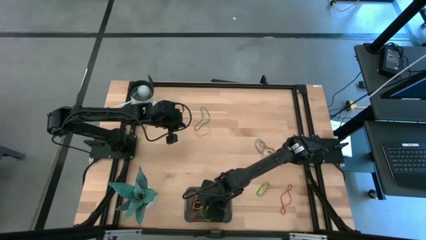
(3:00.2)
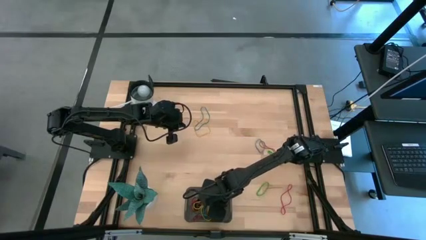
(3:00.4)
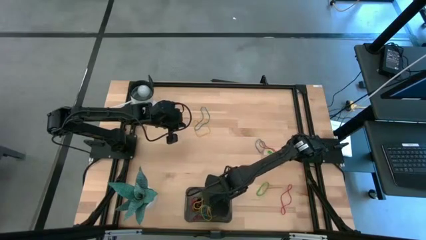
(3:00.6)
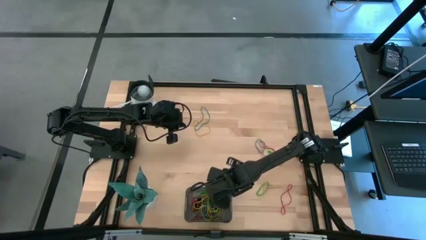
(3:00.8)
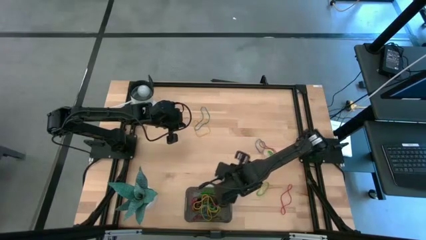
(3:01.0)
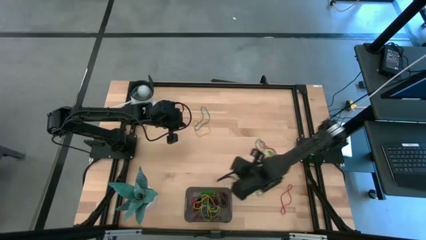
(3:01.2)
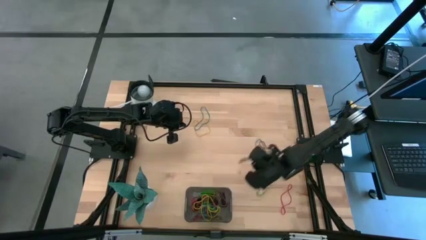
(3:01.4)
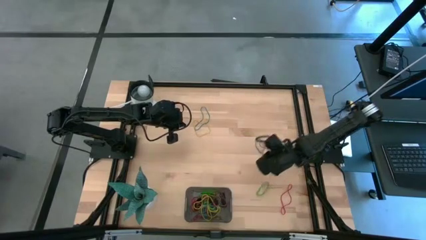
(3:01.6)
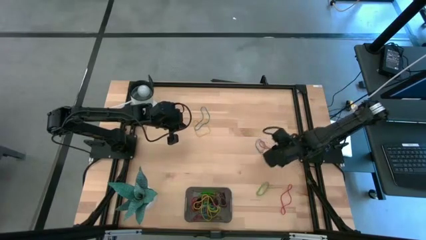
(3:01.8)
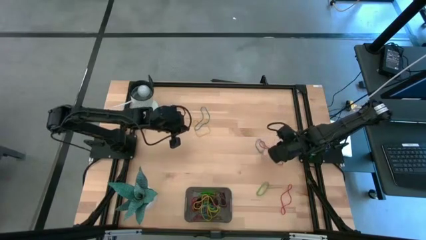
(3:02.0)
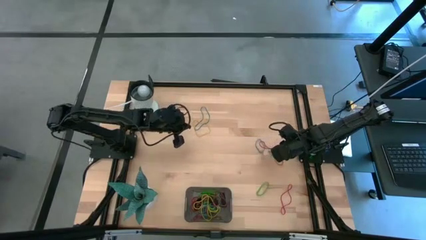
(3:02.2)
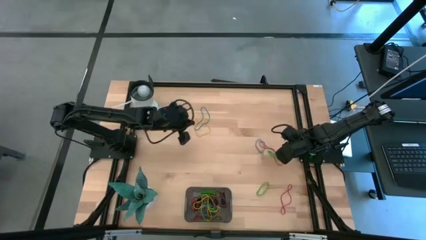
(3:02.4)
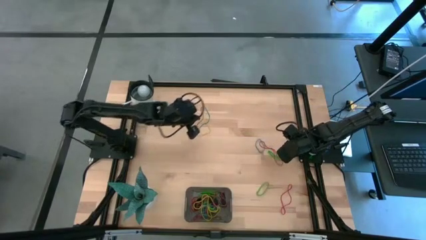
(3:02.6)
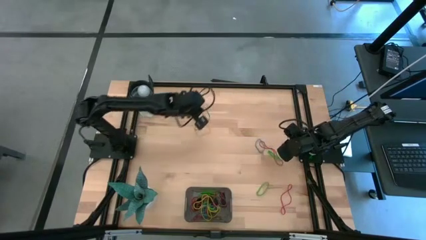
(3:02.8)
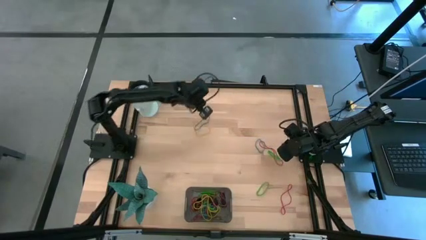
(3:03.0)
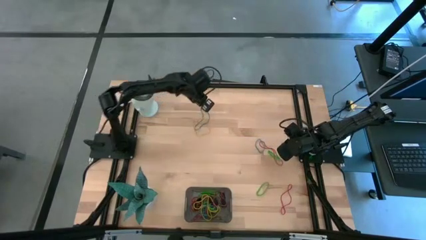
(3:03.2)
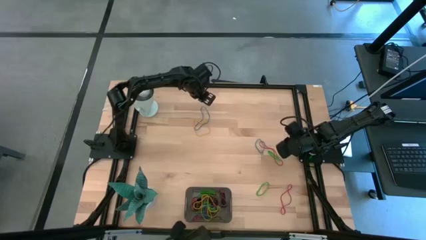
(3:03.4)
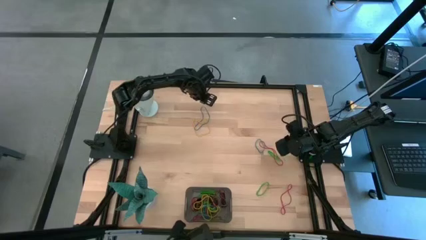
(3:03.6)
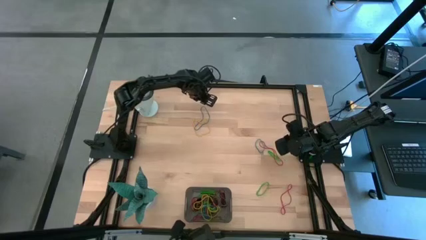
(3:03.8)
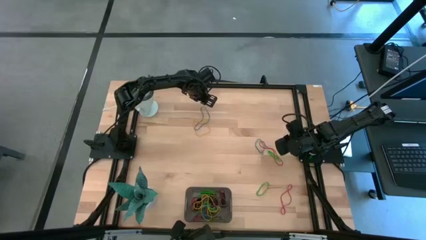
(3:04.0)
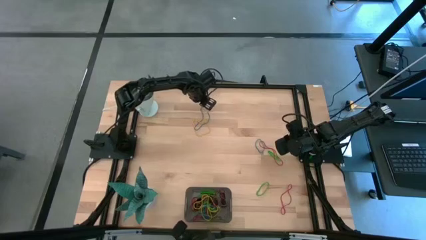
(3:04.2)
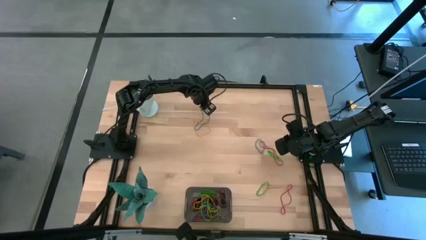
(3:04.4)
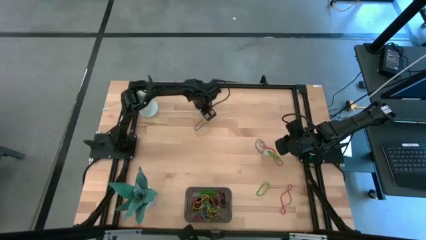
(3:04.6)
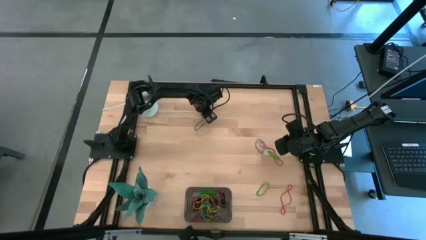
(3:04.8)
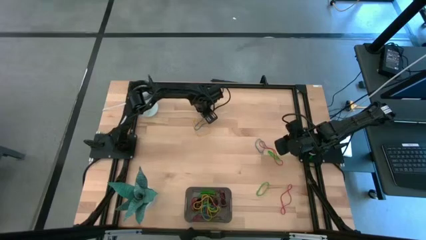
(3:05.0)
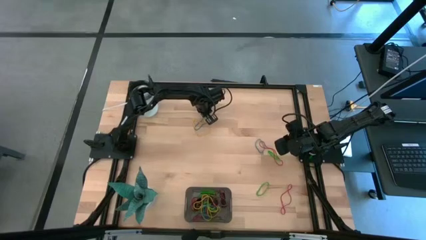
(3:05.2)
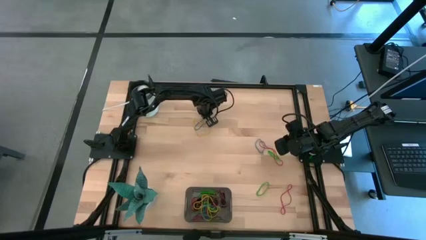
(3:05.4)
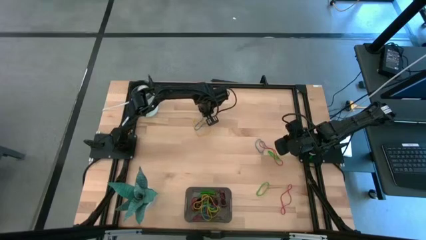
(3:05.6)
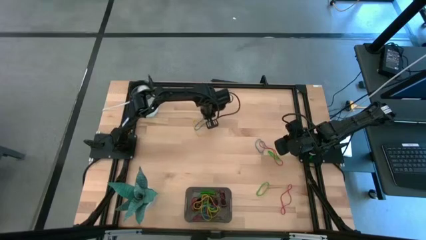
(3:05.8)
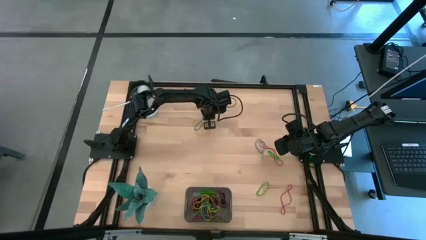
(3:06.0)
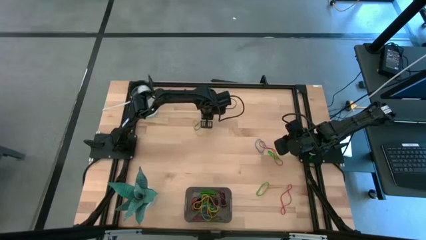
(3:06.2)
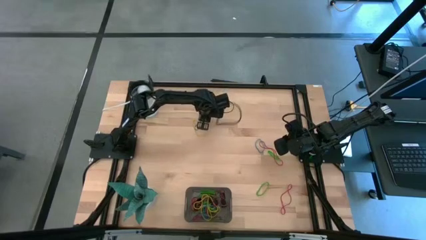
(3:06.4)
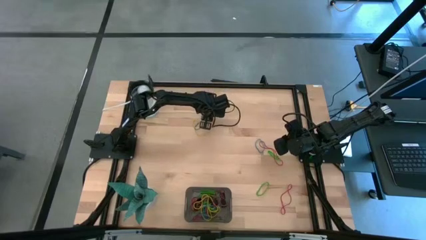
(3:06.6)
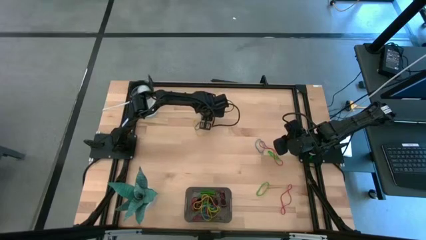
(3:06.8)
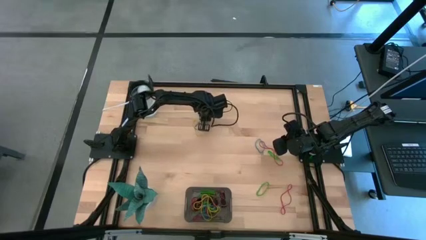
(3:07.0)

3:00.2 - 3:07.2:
Task: Pick and place rubber bands into bin
Put the blue rubber band into the black bin

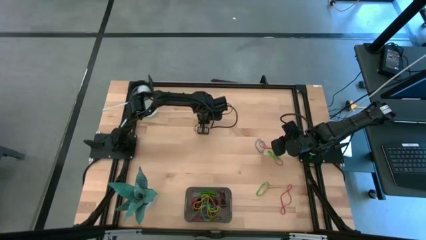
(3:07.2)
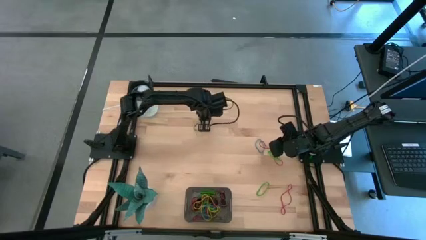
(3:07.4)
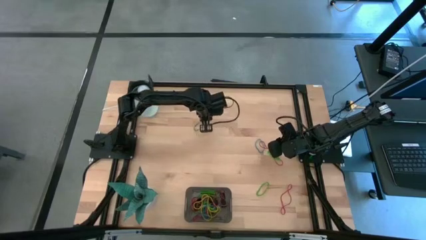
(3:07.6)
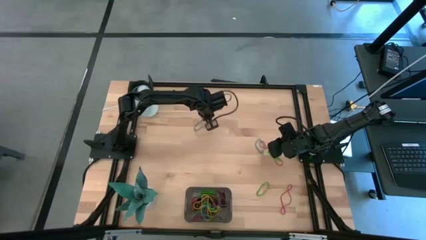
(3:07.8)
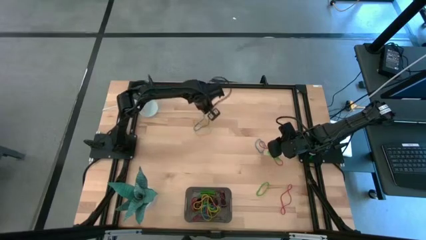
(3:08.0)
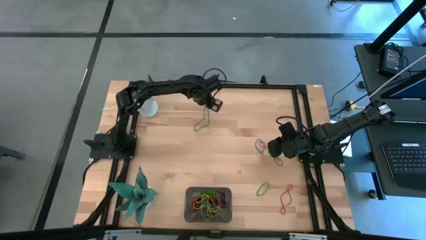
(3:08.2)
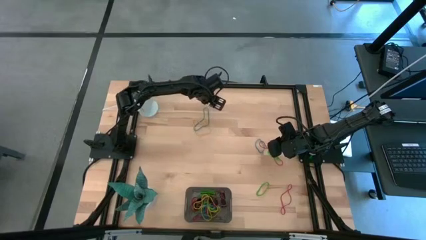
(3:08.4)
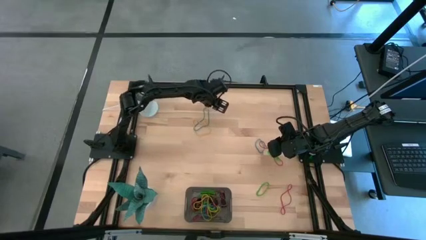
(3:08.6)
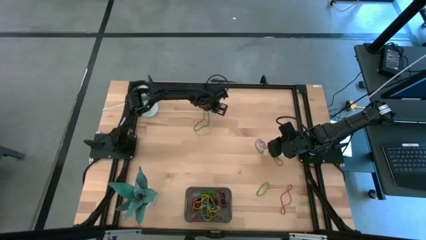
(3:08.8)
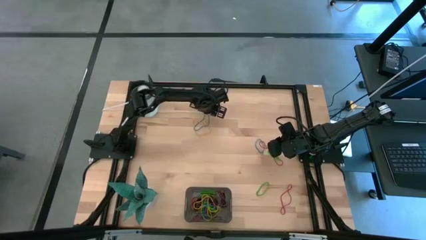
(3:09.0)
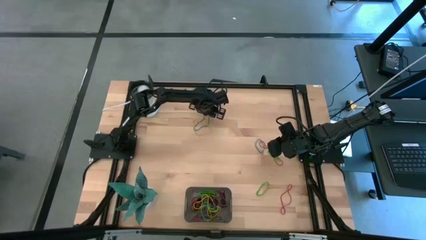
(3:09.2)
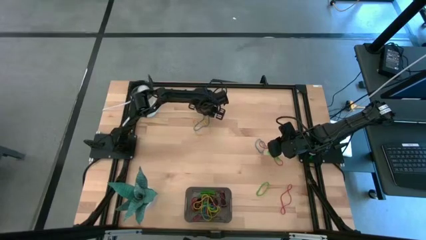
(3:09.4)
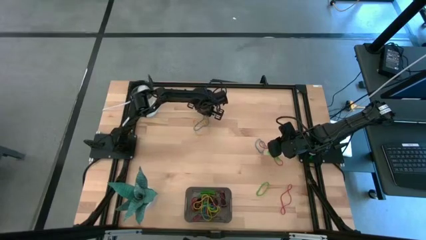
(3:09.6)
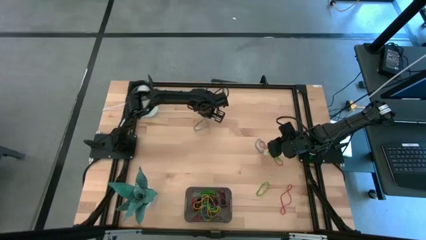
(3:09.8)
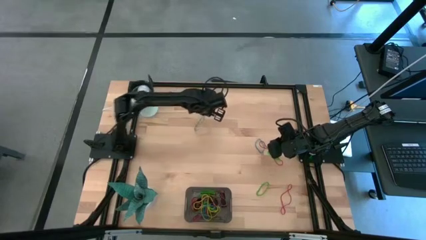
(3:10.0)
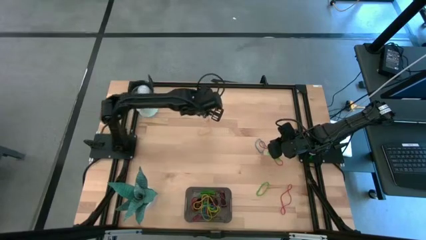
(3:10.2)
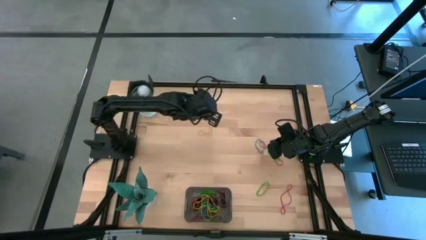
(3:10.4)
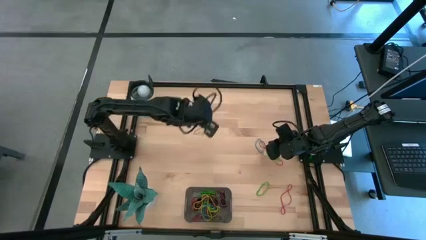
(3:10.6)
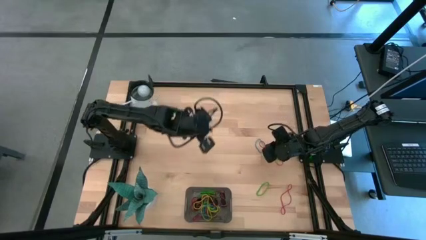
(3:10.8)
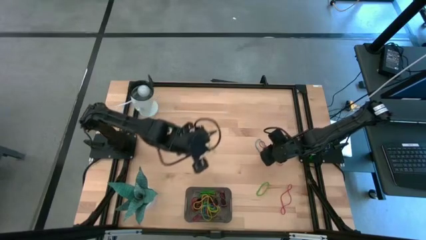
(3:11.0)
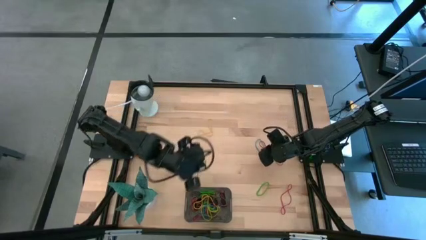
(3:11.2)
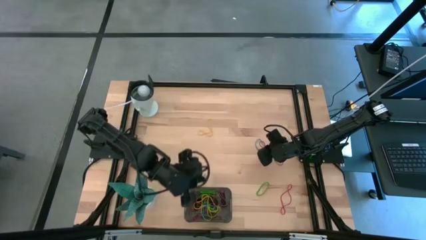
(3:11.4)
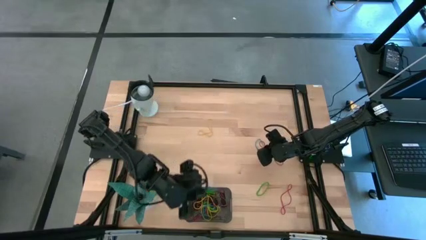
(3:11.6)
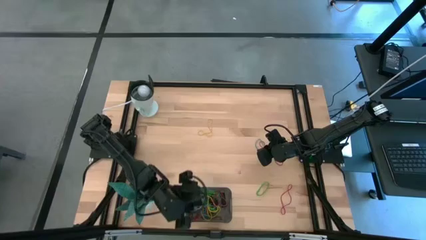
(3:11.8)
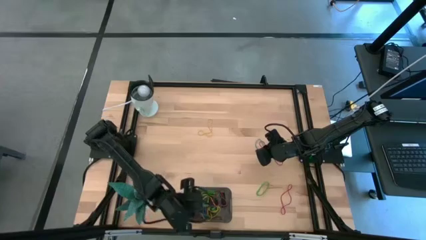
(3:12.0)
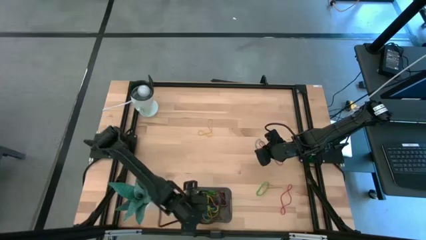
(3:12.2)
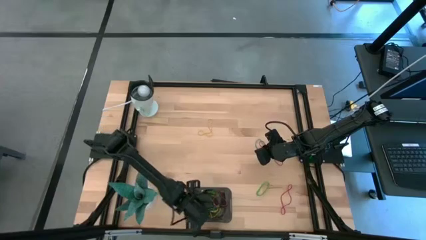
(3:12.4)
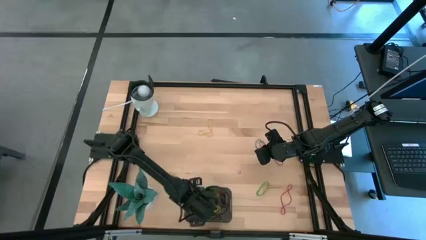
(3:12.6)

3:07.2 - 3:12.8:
Put the blue rubber band into the black bin

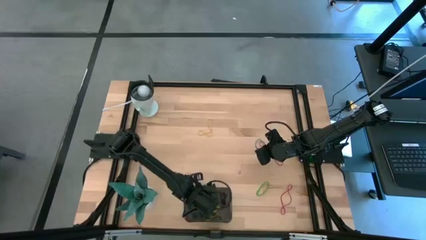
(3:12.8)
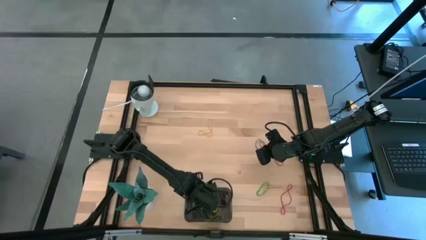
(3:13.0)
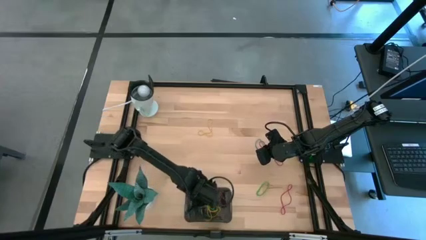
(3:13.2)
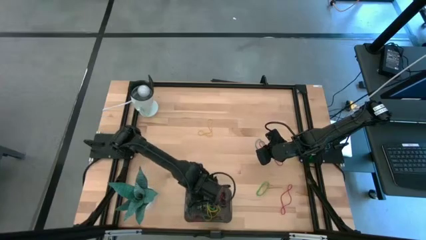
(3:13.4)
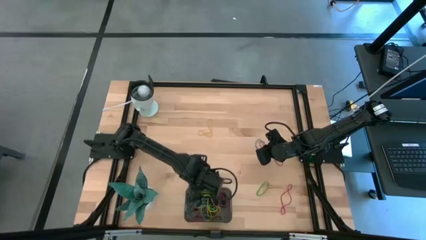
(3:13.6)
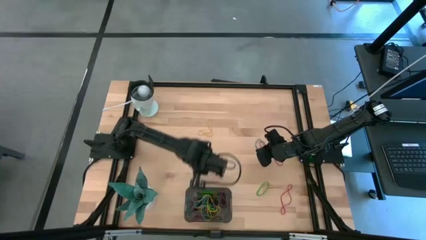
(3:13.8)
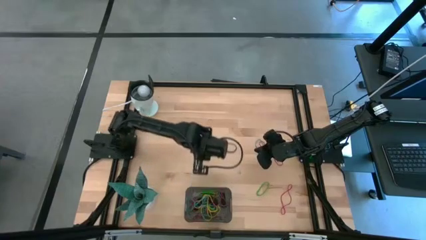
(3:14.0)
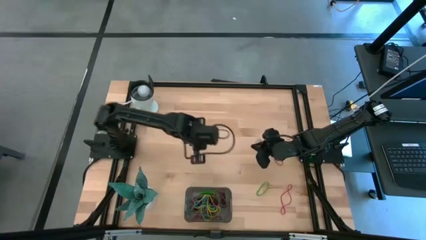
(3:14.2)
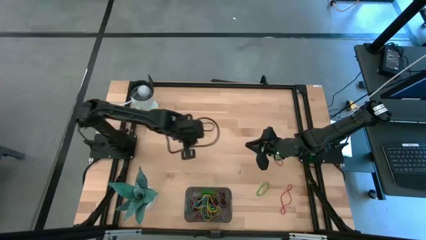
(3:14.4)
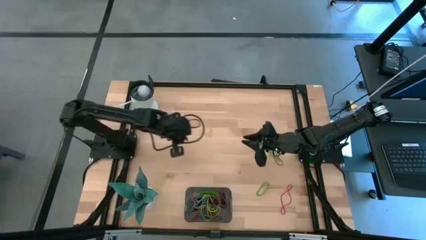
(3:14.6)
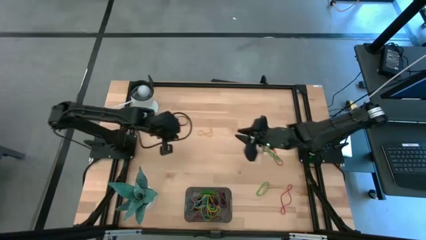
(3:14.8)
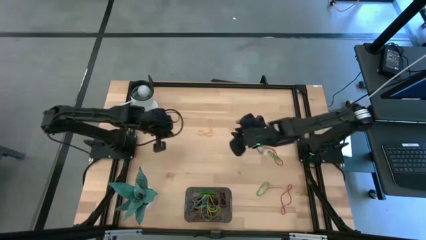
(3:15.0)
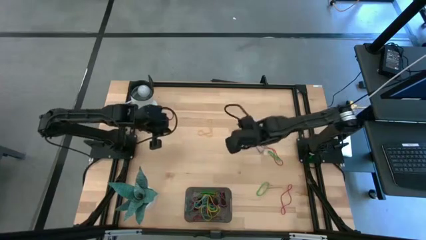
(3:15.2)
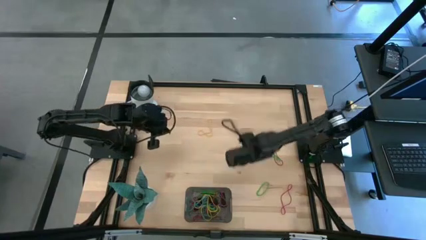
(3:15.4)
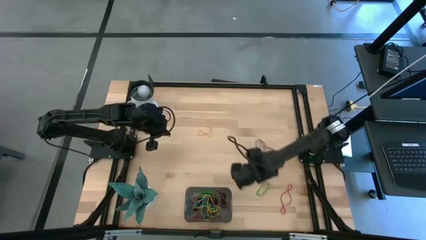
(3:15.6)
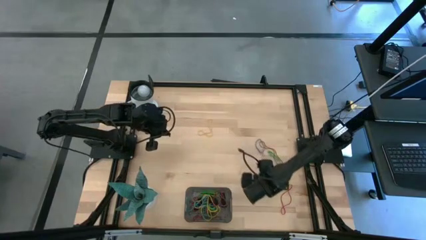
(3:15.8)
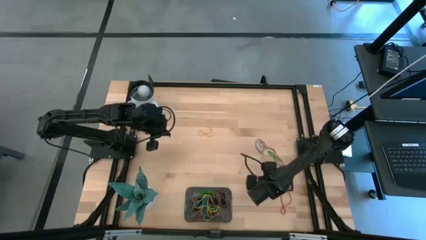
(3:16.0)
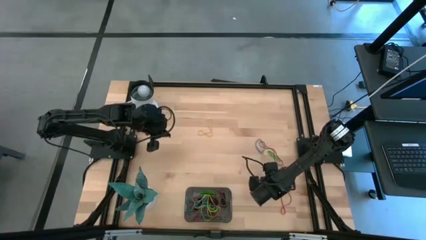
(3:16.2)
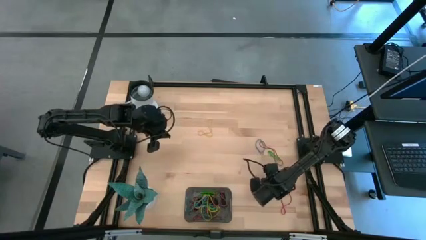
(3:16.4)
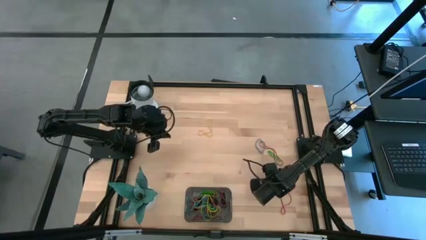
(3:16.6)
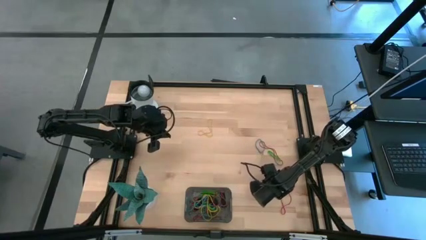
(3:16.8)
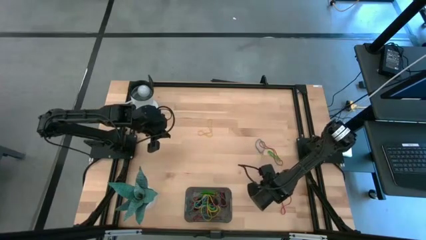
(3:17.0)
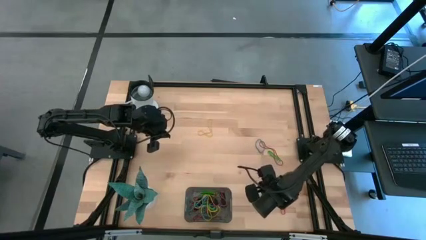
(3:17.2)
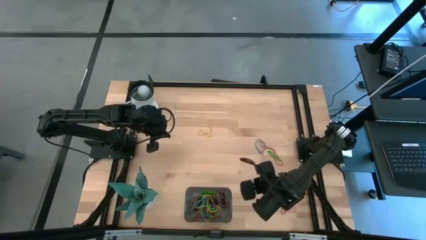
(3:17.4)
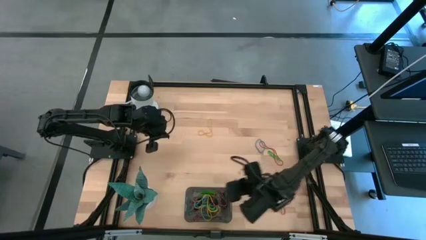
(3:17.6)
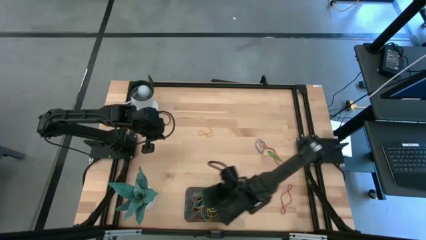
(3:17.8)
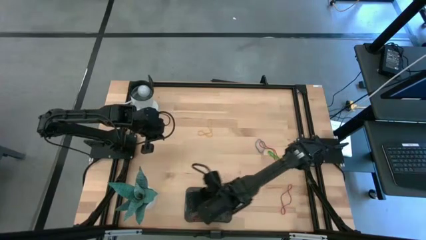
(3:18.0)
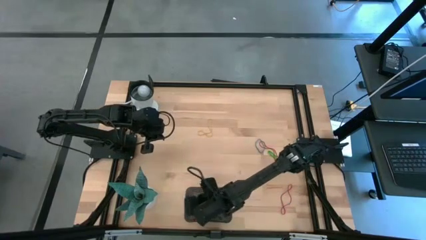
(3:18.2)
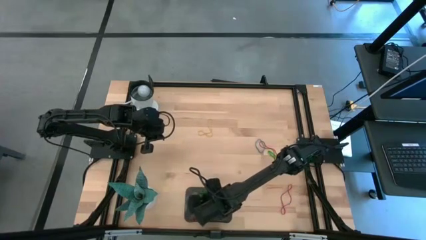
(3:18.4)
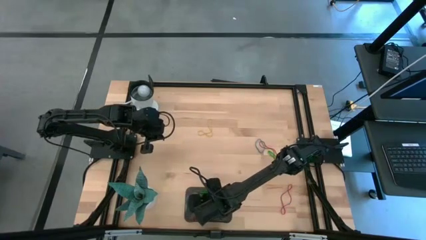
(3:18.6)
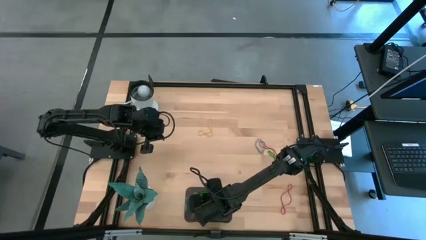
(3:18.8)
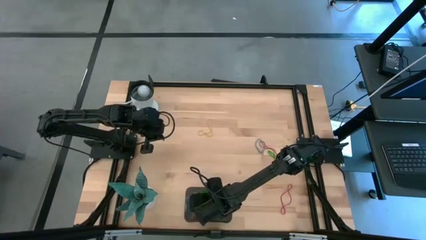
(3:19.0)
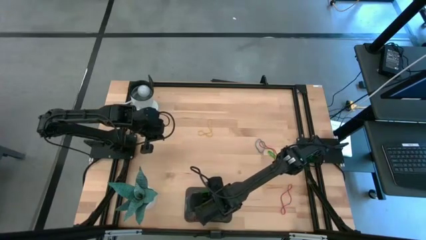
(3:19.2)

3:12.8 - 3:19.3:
Put the green rubber band into the black bin
